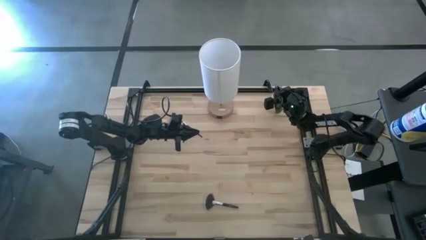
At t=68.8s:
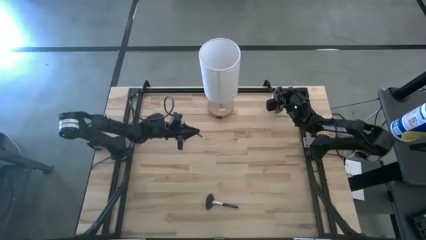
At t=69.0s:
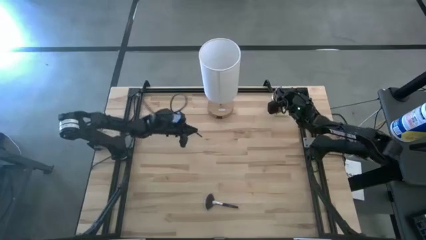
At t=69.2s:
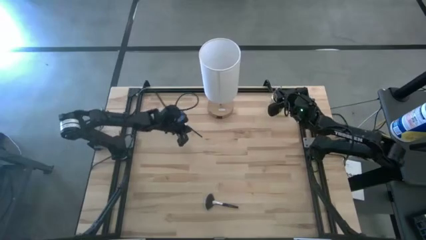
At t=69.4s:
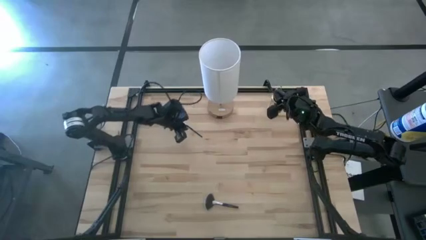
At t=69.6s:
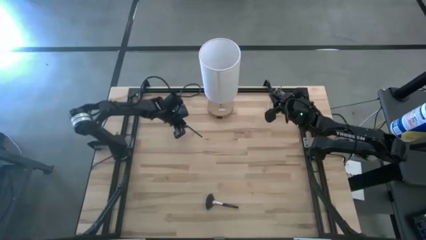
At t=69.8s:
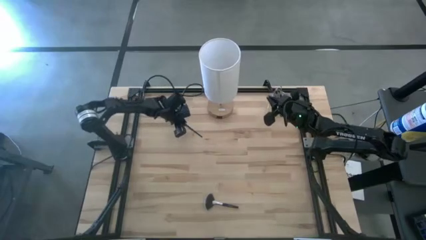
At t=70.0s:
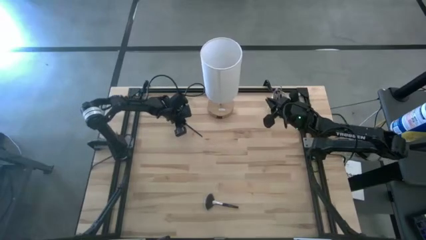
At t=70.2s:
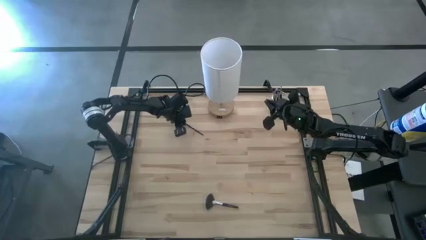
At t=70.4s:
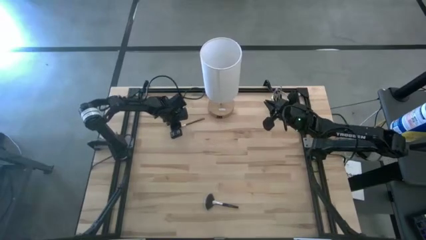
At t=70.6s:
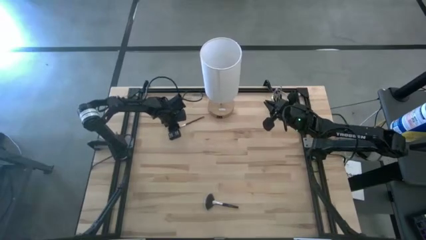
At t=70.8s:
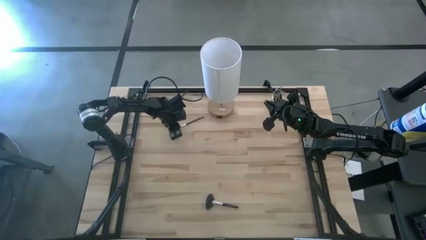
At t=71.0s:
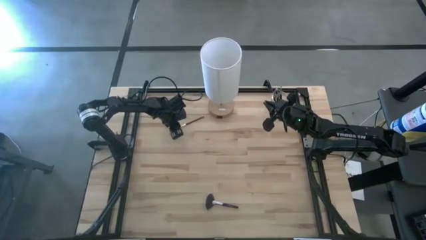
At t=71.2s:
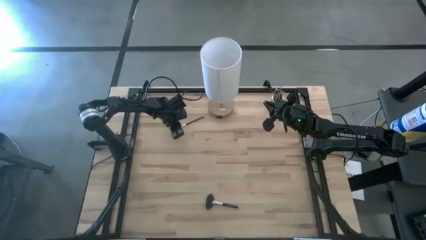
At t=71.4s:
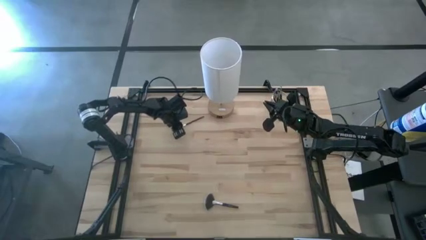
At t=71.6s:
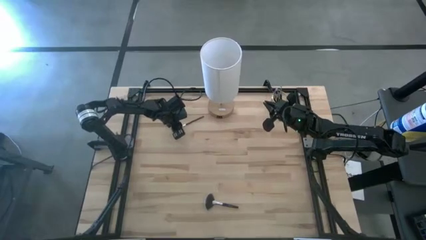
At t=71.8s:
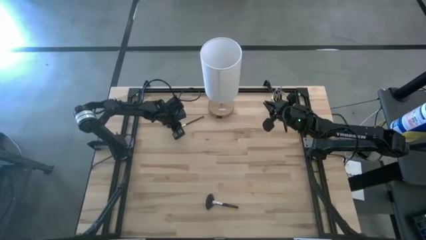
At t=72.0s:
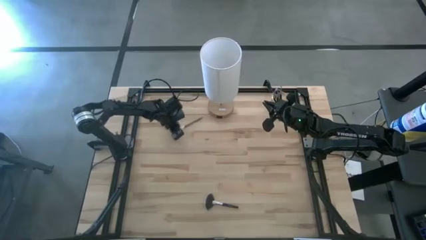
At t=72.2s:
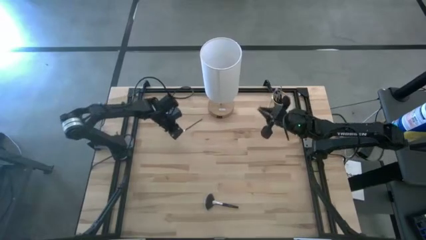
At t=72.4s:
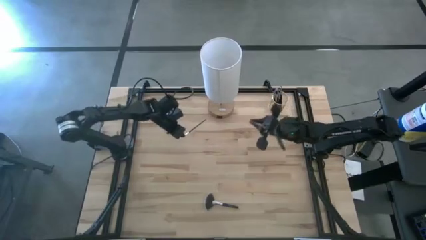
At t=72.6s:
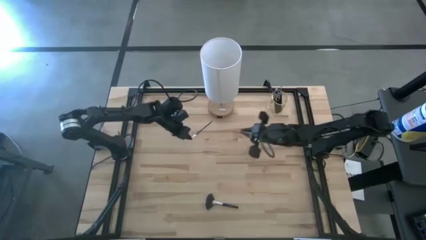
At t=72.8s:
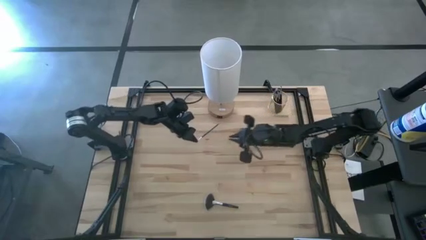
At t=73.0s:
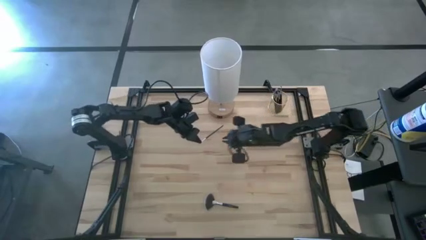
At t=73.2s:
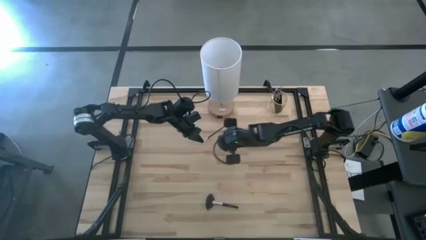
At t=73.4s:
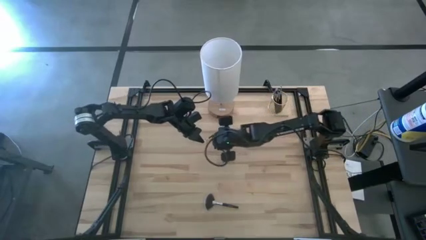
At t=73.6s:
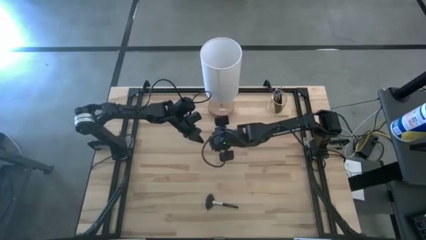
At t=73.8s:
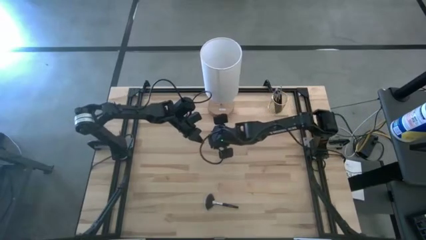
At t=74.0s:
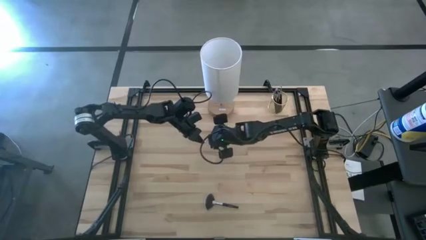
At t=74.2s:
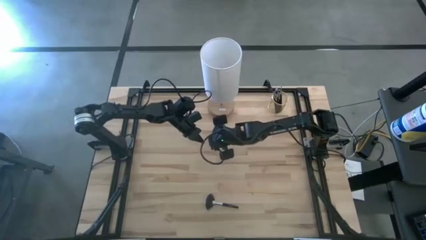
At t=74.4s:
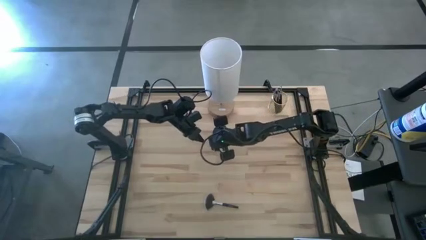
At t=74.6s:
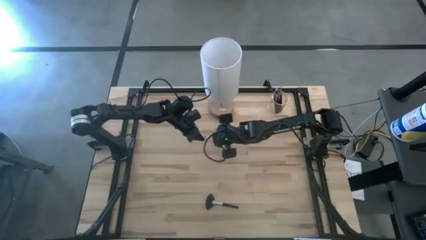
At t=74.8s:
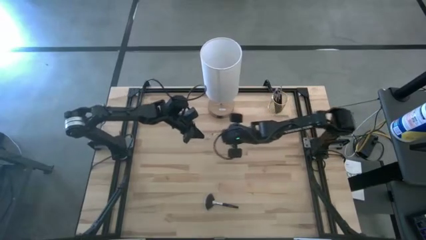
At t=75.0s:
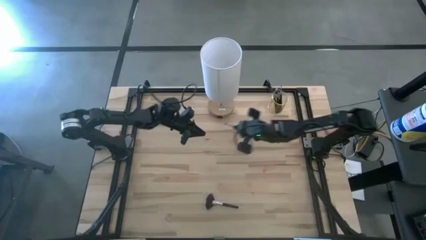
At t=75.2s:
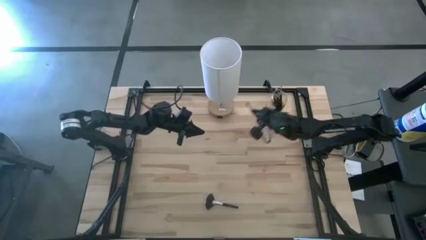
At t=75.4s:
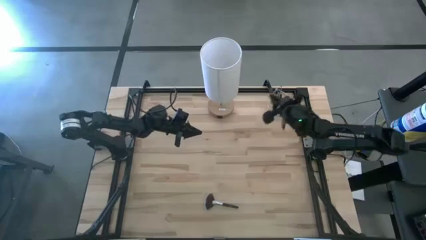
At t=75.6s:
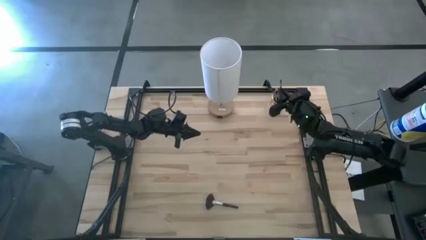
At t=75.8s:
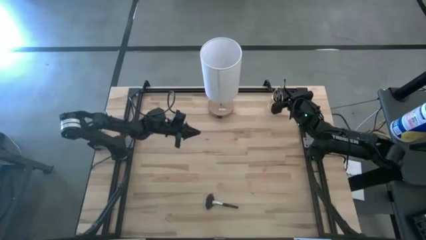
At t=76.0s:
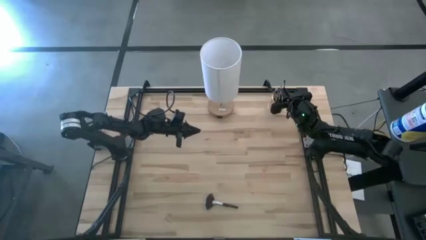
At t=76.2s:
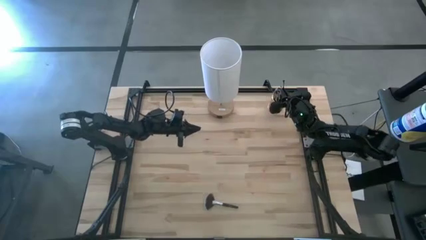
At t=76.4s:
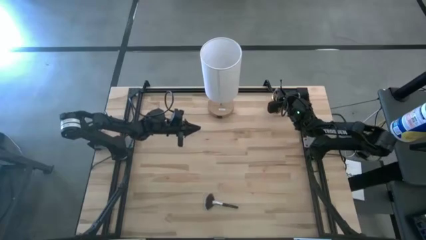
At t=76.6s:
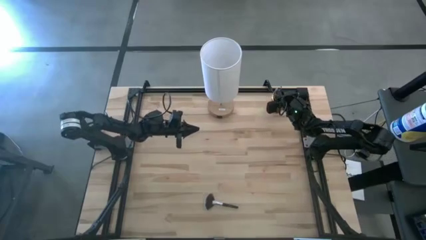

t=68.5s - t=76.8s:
Task: Pick & Place Makeup Brushes
Put the eyeshadow brush into the makeup brush holder

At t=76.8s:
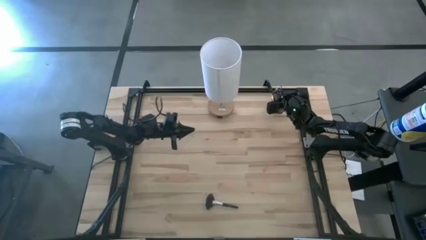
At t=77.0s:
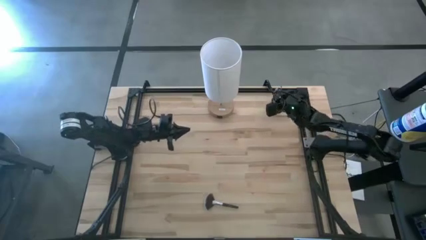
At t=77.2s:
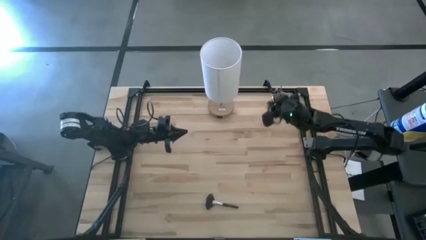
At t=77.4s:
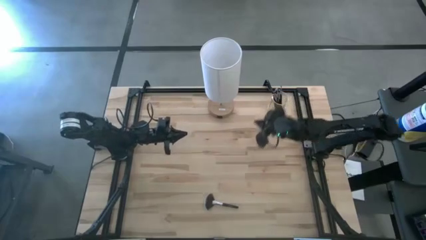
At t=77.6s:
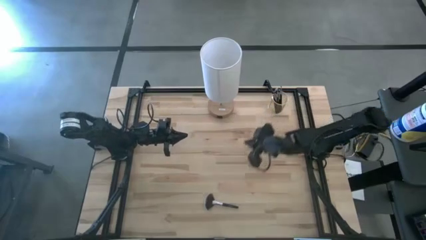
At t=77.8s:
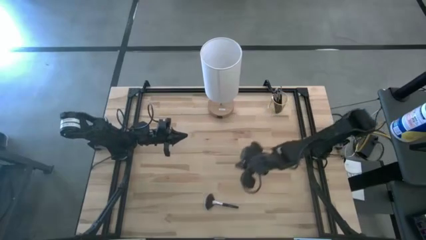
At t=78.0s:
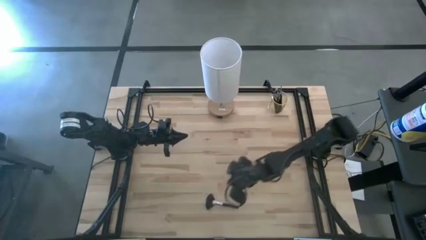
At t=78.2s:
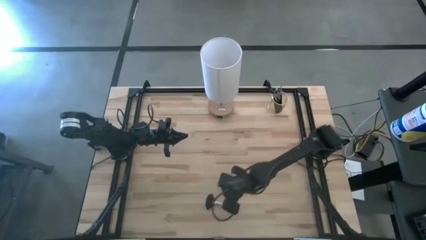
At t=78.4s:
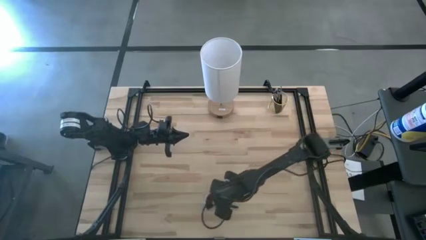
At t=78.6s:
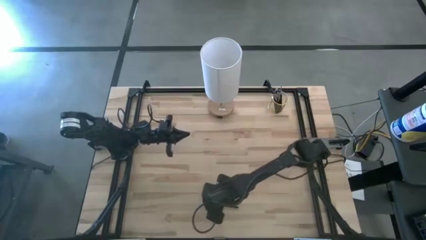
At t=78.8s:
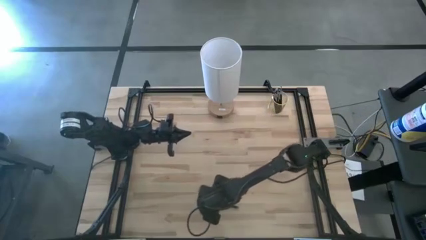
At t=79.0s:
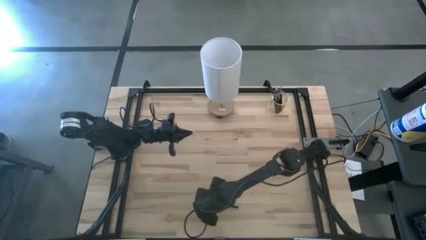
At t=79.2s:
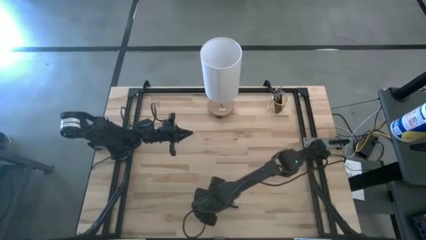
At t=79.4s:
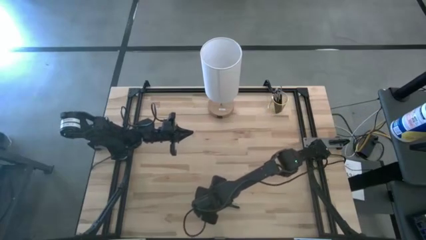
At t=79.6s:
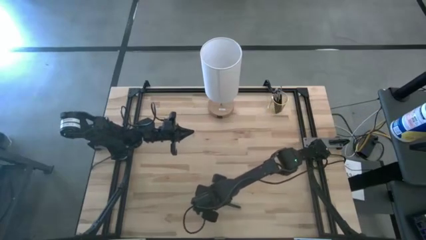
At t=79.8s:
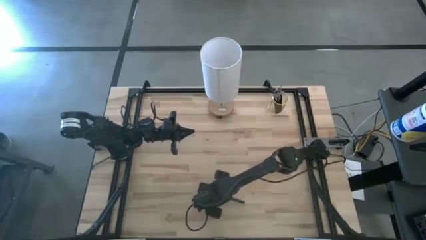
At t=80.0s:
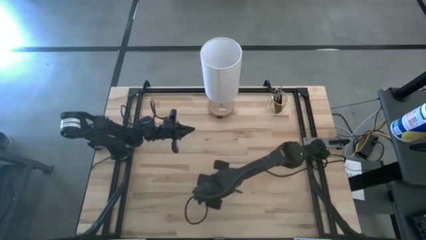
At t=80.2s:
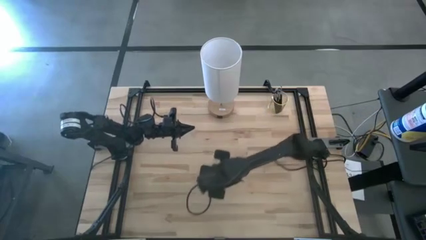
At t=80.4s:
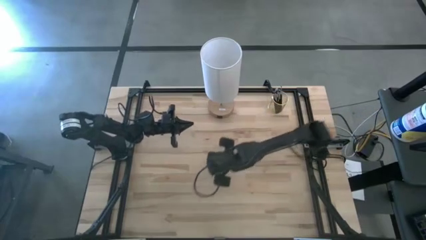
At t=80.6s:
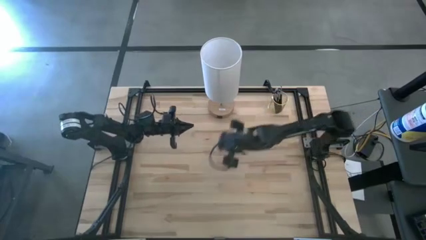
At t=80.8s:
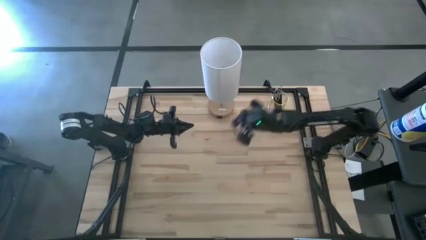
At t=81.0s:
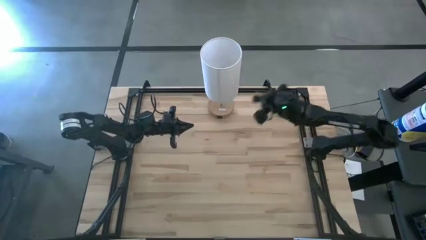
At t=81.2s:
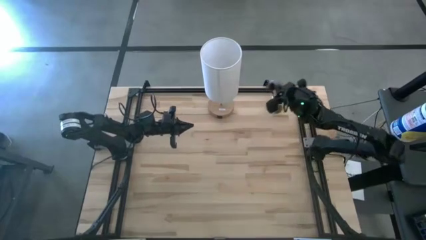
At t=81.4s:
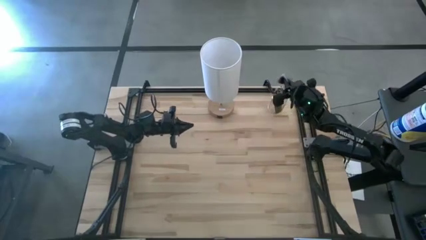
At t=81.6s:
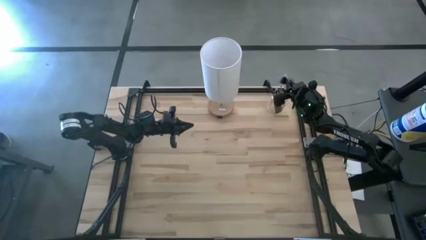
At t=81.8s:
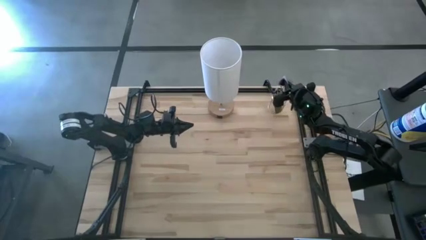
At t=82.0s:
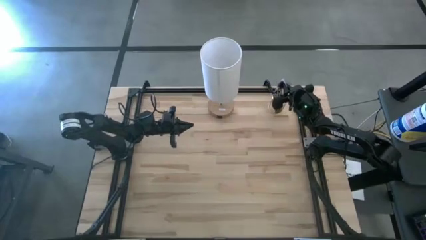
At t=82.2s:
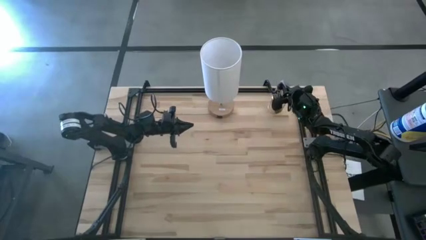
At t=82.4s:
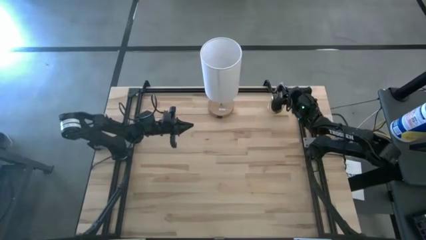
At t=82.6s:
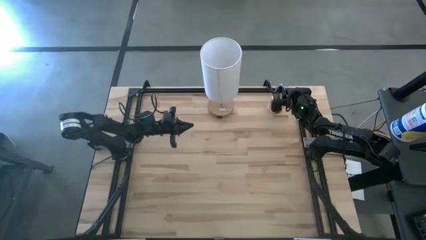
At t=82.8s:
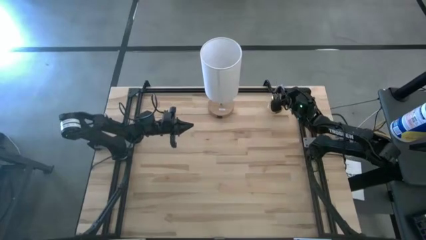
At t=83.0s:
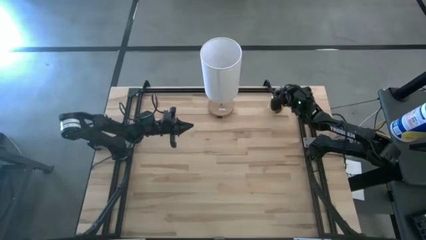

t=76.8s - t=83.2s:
Put the highlighter brush into the makeup brush holder

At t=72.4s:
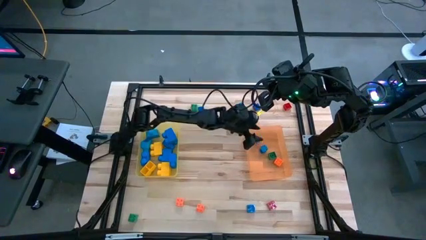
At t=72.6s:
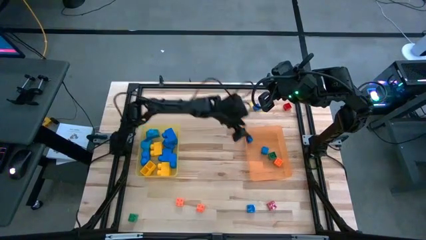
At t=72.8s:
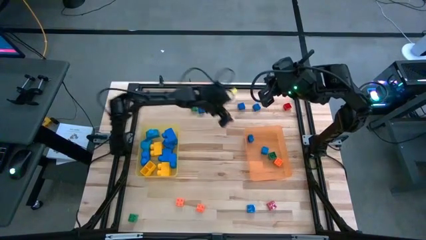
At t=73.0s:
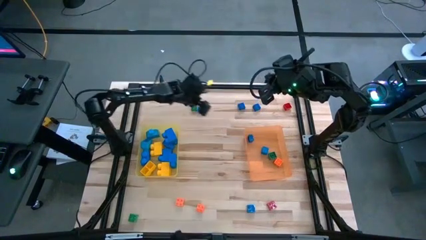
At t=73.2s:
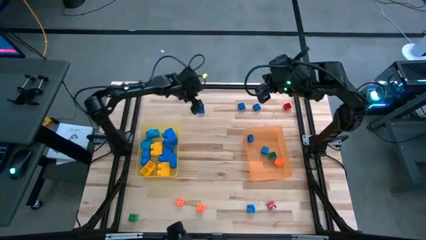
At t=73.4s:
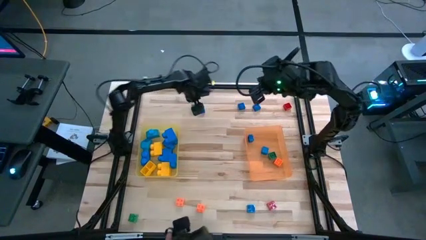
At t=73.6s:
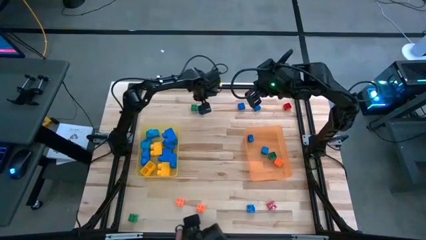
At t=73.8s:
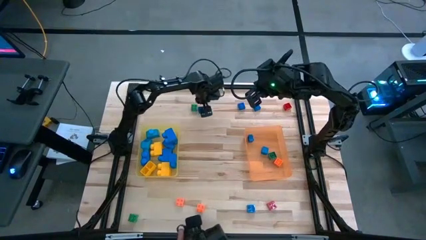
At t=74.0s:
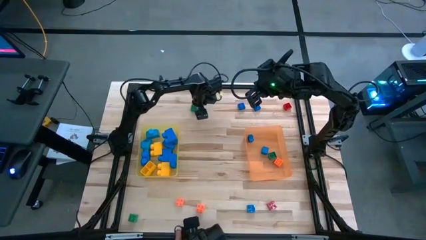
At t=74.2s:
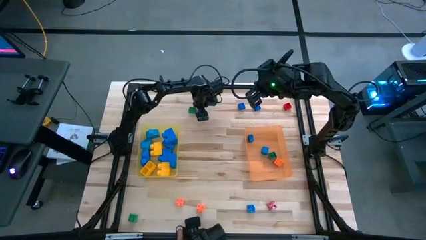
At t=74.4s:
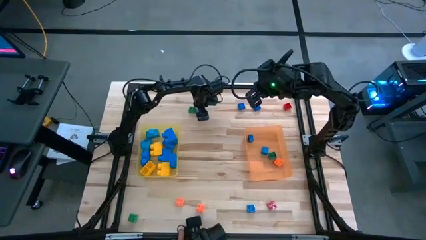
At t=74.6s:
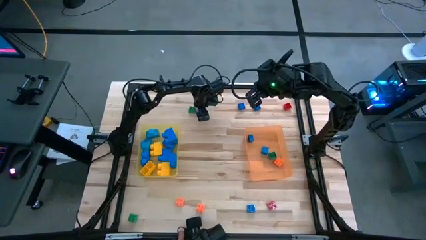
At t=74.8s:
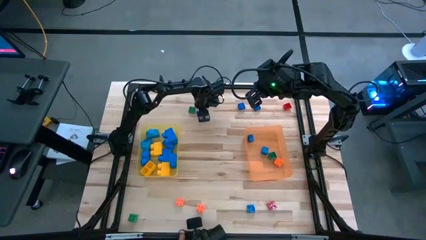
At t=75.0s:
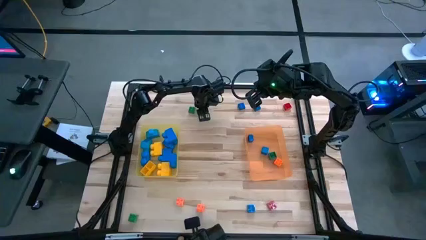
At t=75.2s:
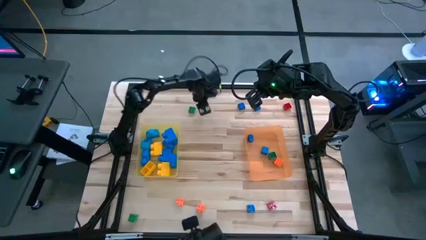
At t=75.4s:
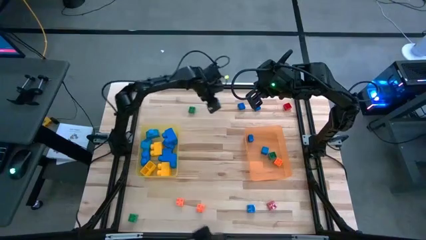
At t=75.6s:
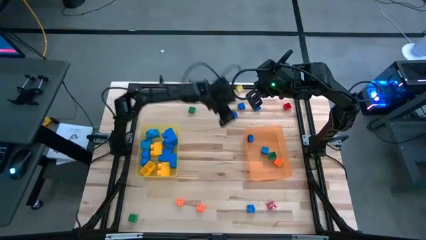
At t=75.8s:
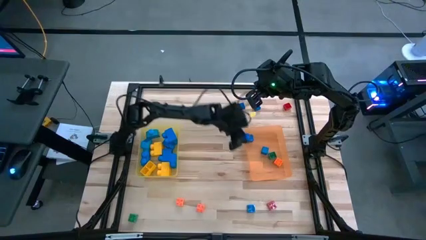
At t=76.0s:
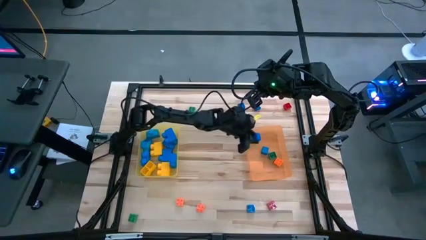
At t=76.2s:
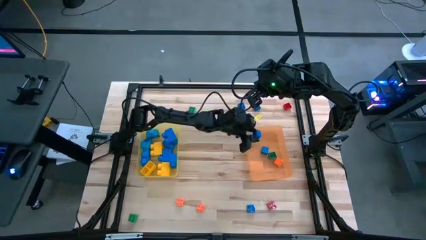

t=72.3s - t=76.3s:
Task: Sort blocks by size
Put the small blue game piece into the orange bin
